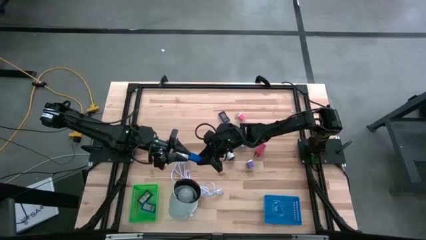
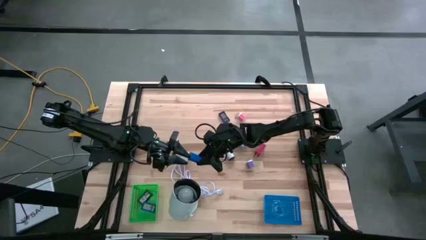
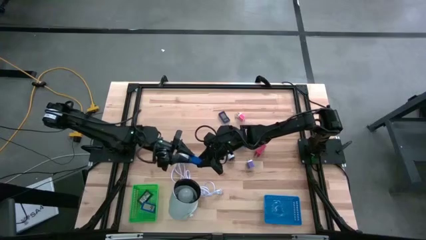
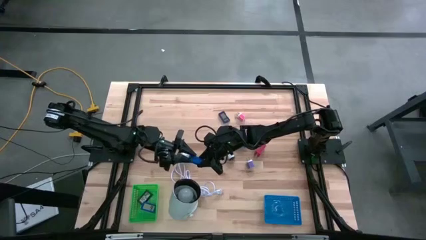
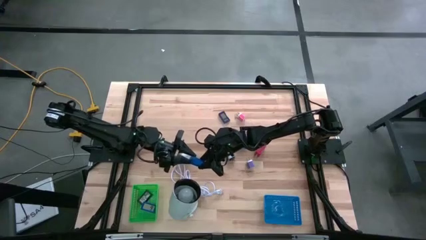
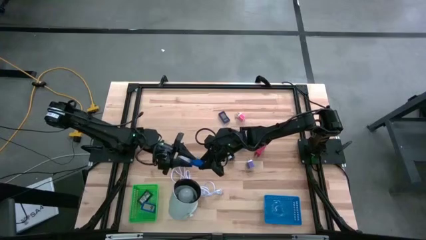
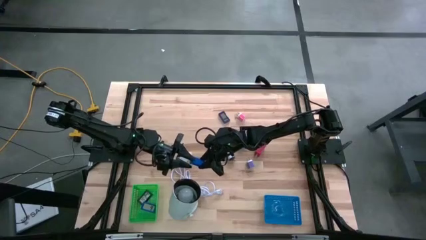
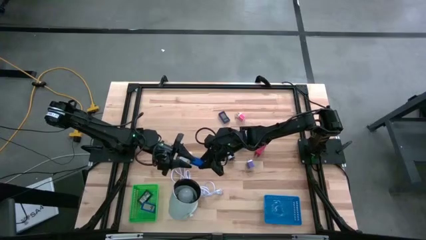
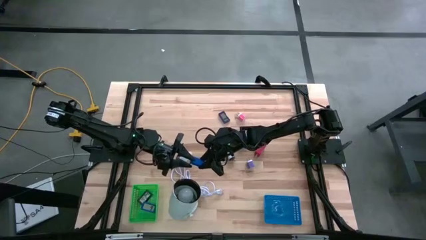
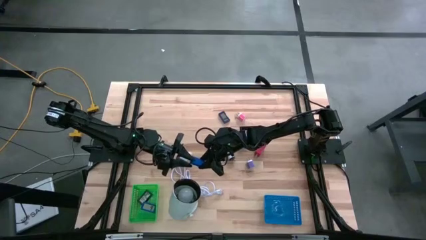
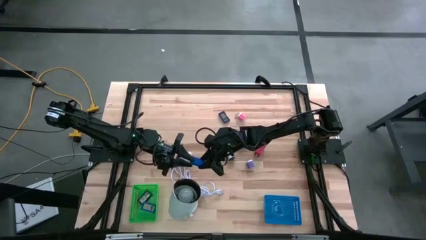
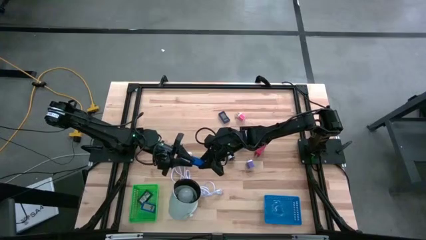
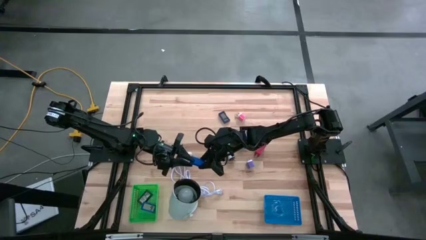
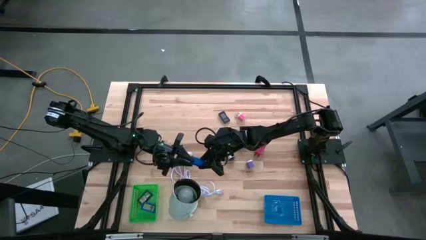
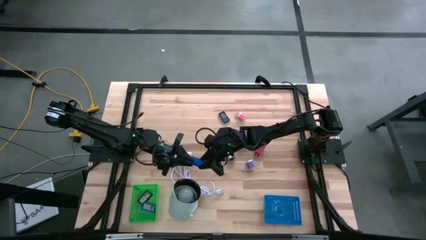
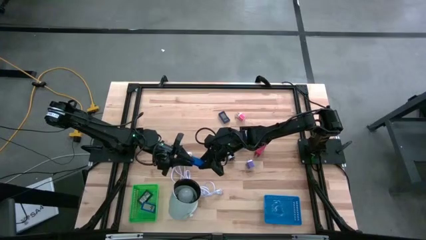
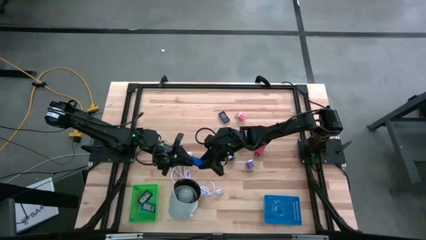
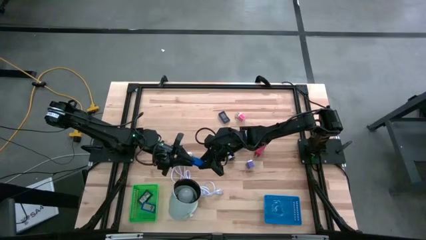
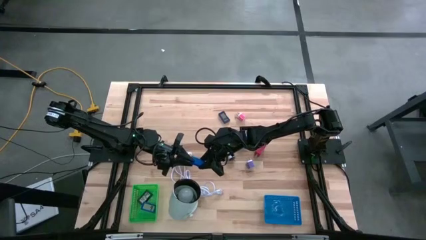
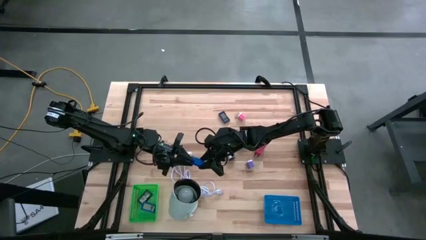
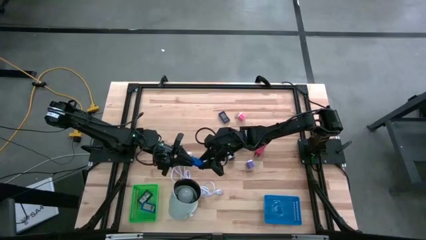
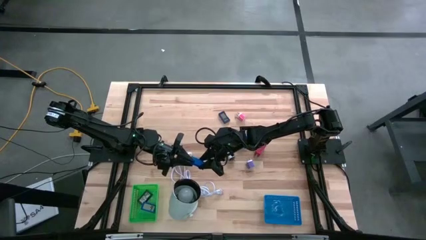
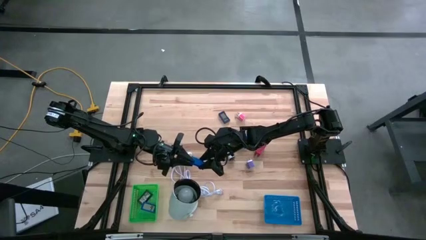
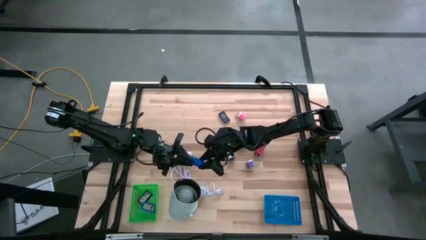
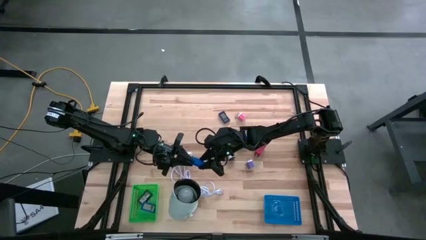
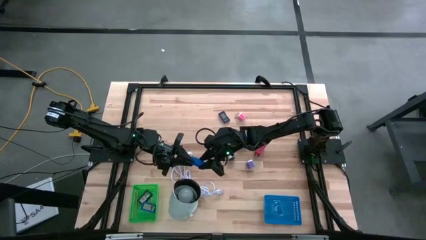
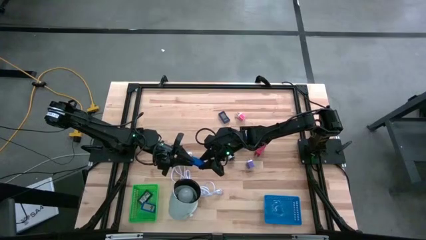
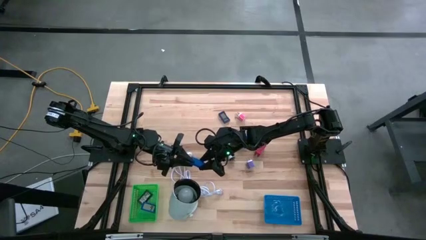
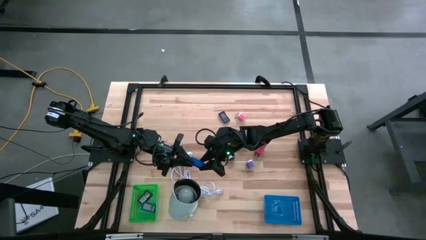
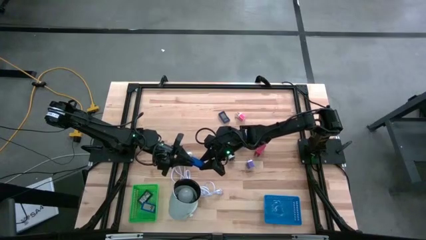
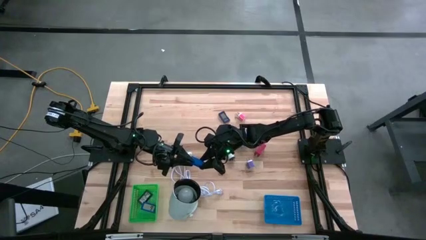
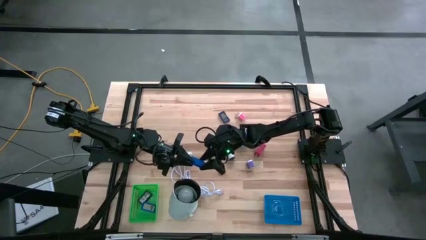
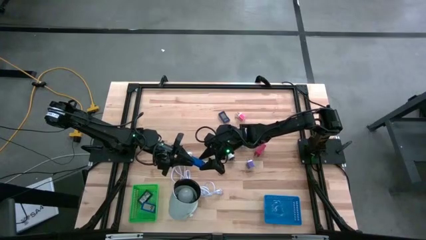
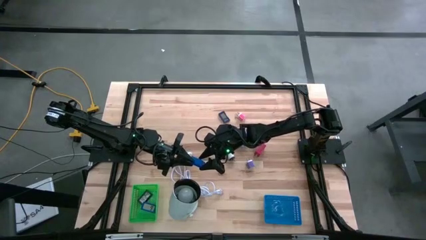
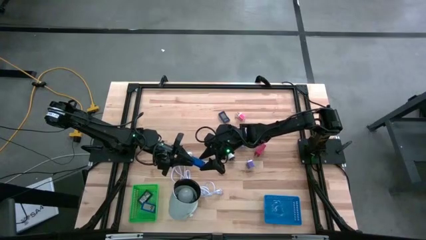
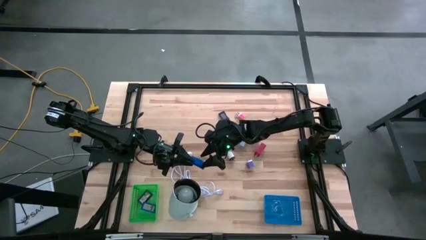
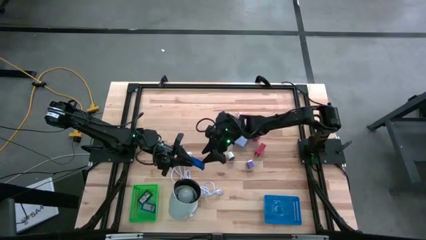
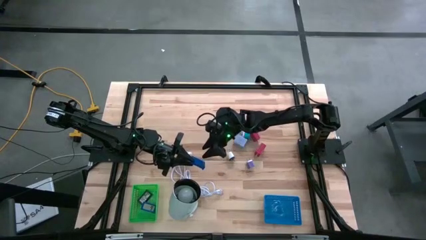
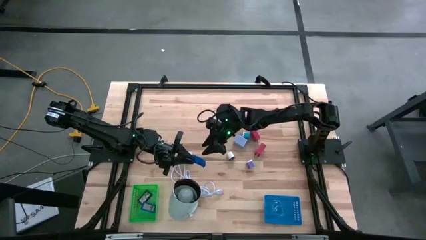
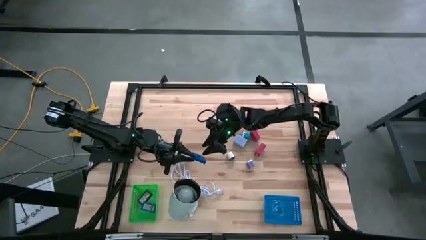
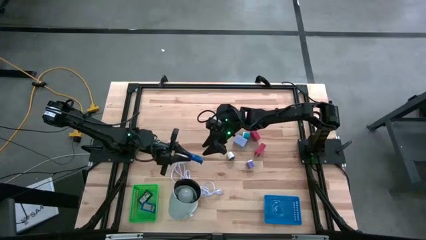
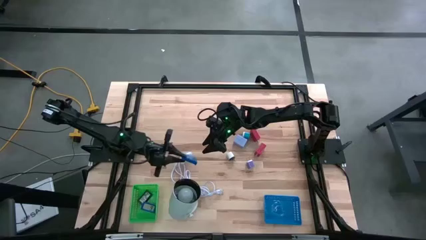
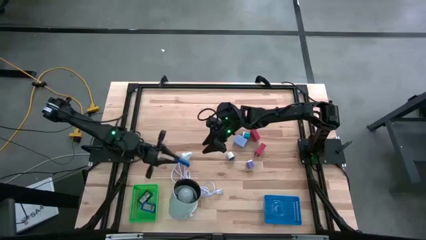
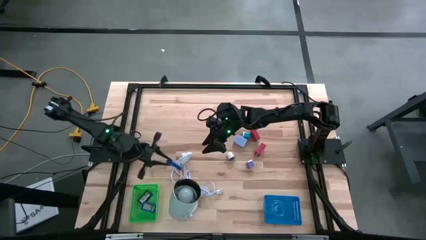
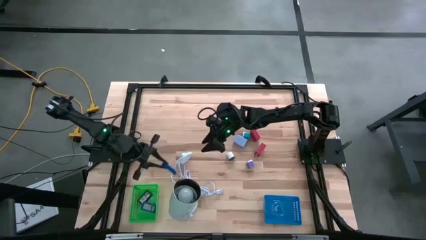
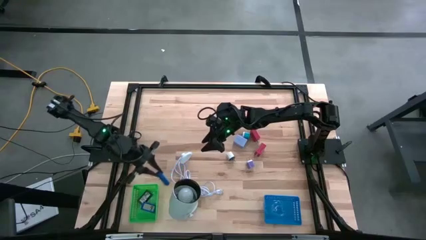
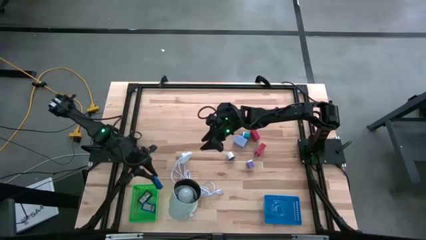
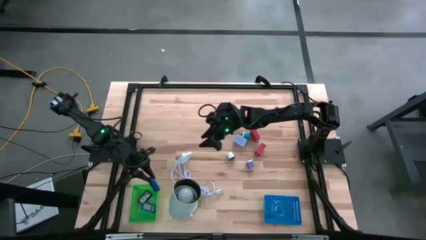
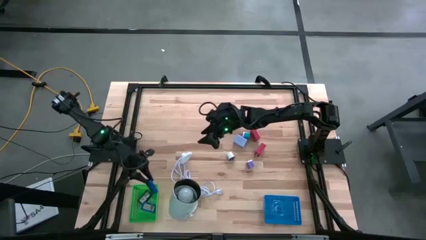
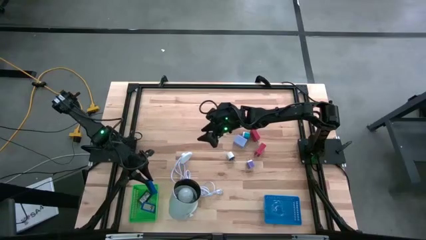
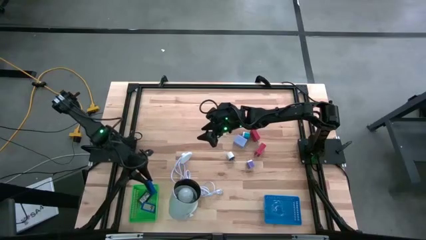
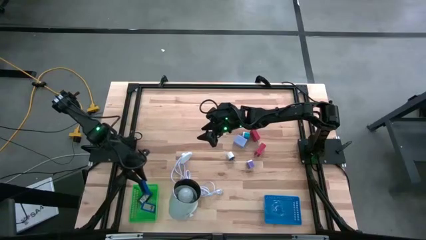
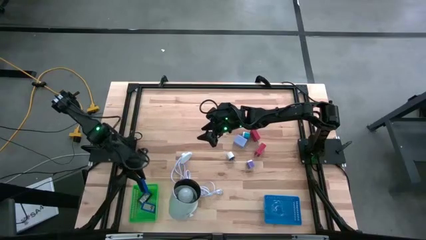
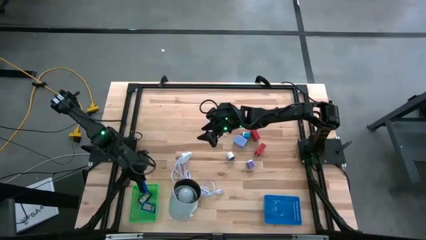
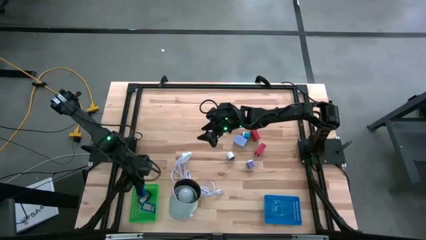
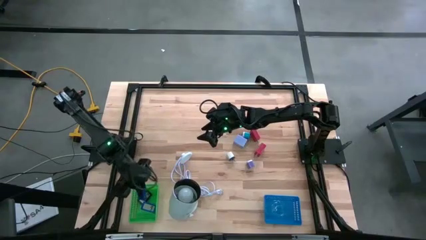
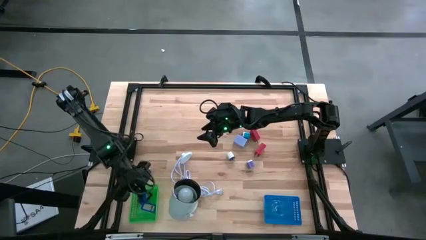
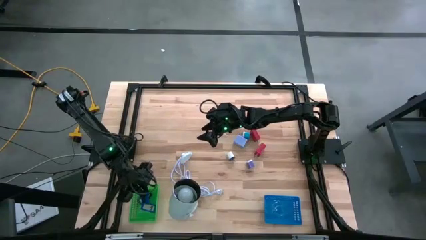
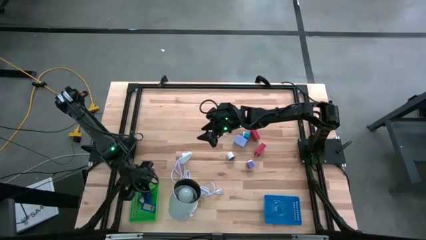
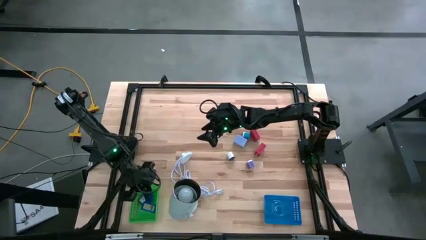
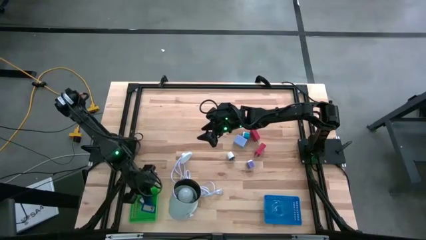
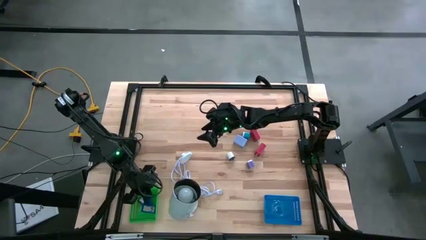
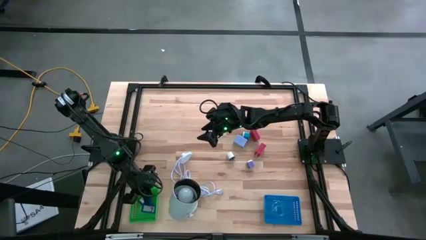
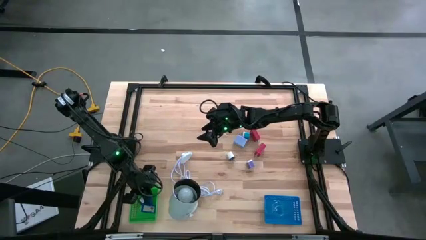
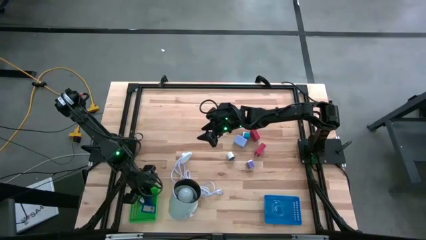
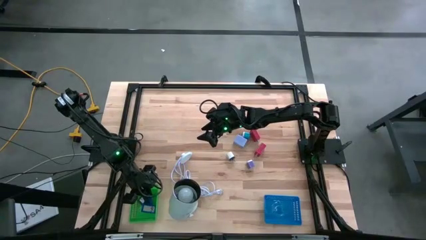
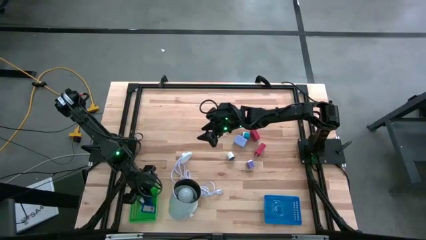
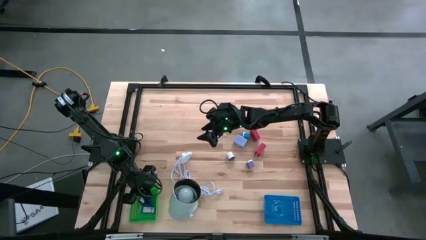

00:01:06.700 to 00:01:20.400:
Task: Pick & Place Office items
Put the blue digital timer into the green basket

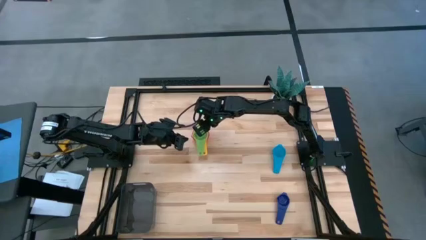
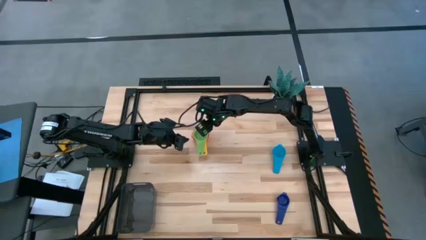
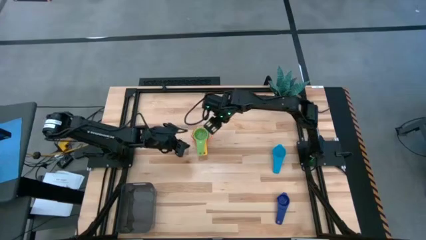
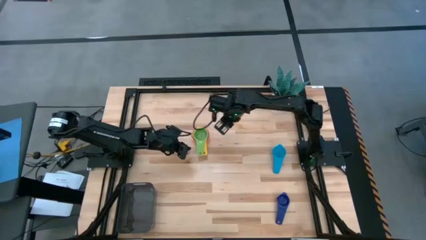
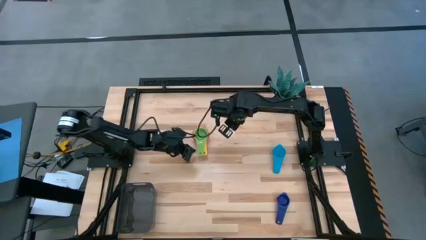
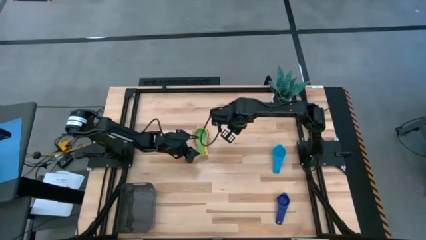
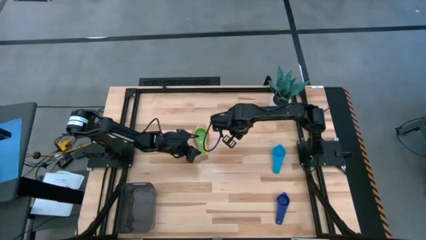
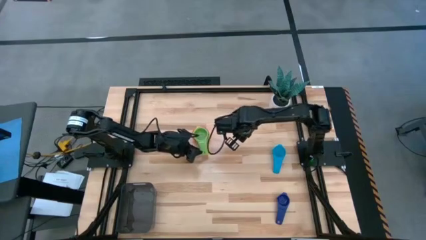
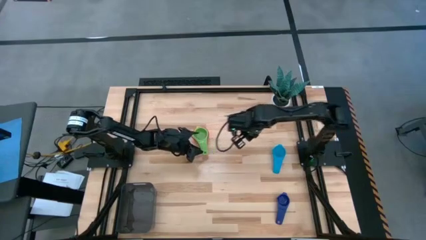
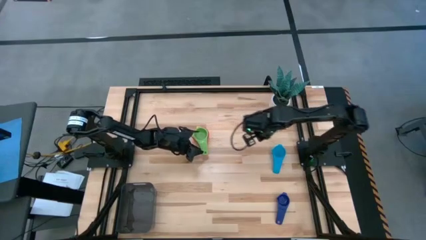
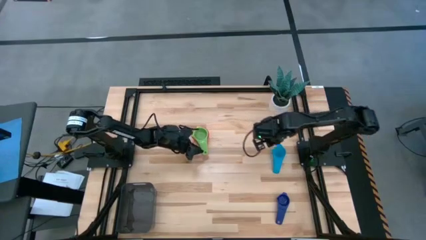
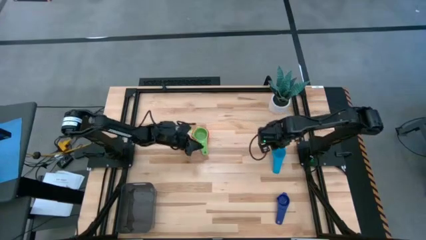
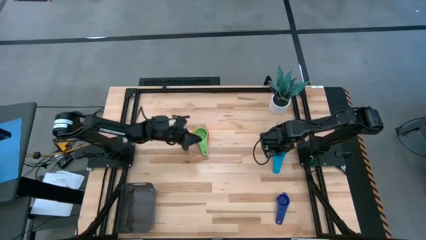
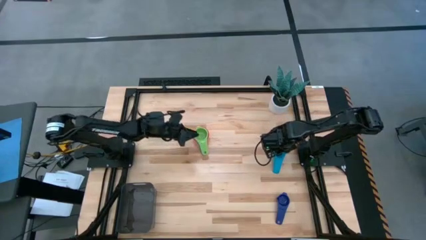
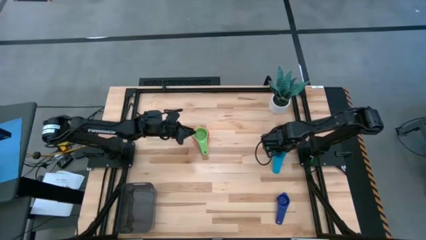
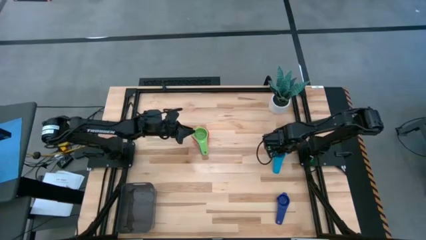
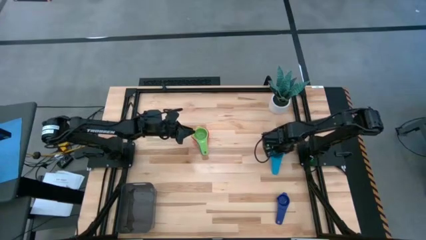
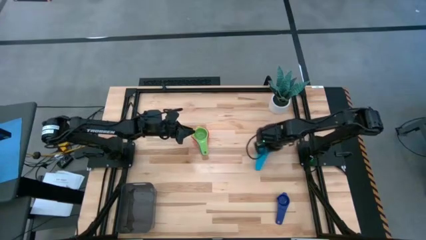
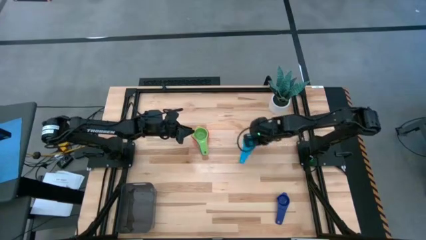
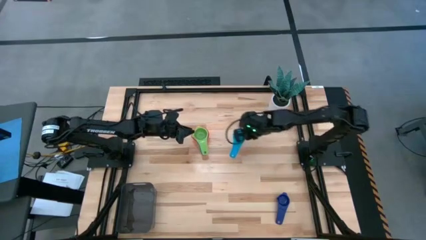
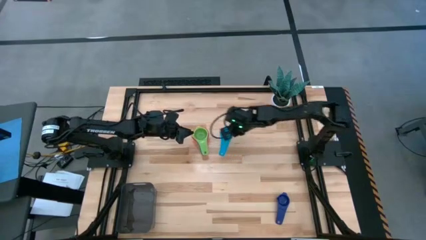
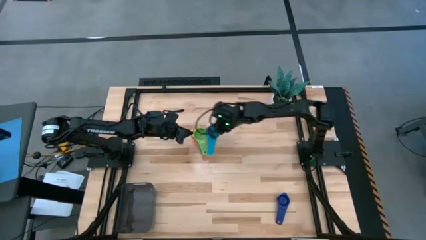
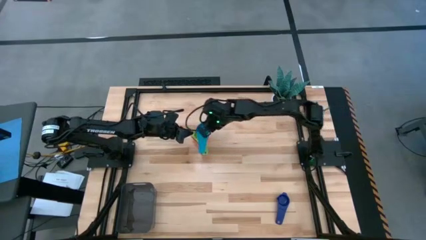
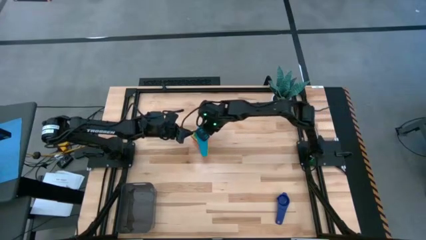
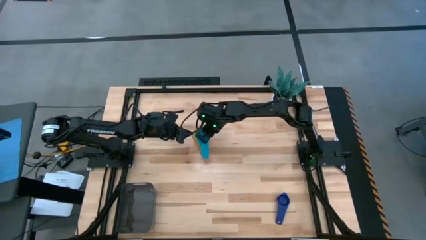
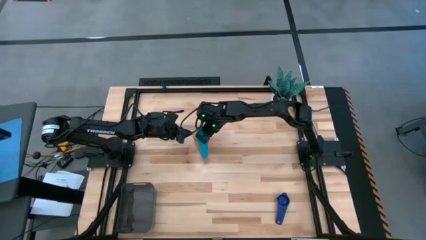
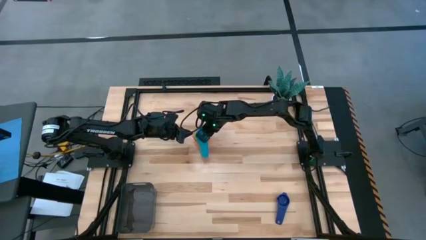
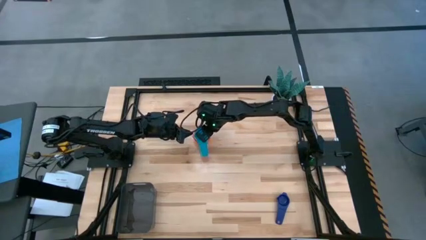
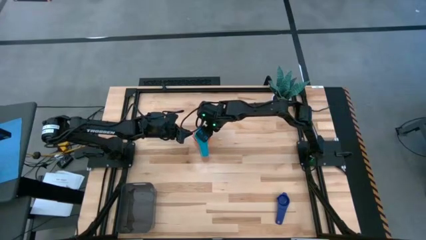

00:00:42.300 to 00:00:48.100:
Task: Nest measuring cups in basket
Stack the light blue measuring cup on top of the green measuring cup
